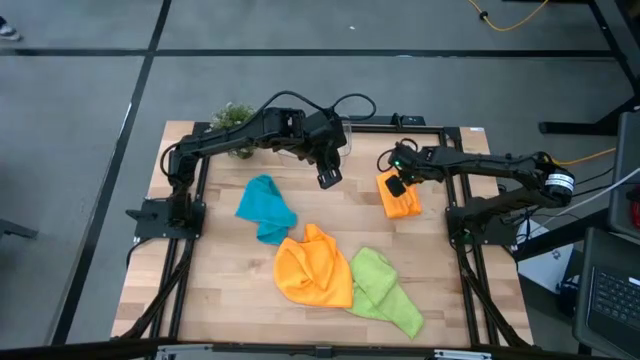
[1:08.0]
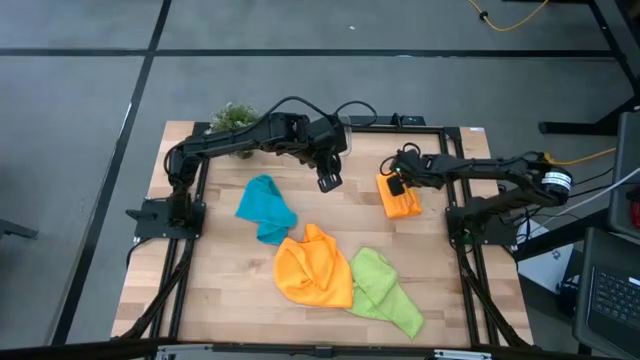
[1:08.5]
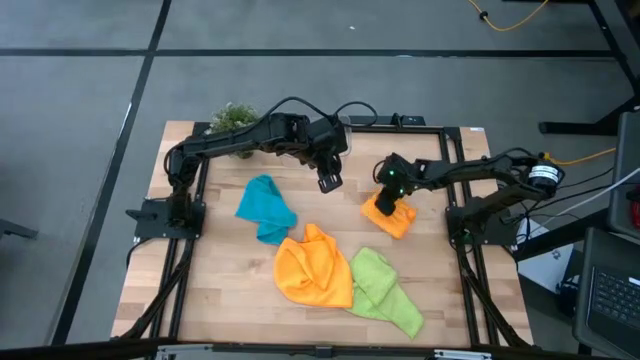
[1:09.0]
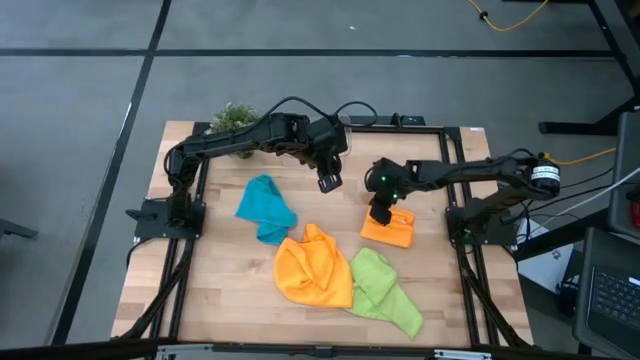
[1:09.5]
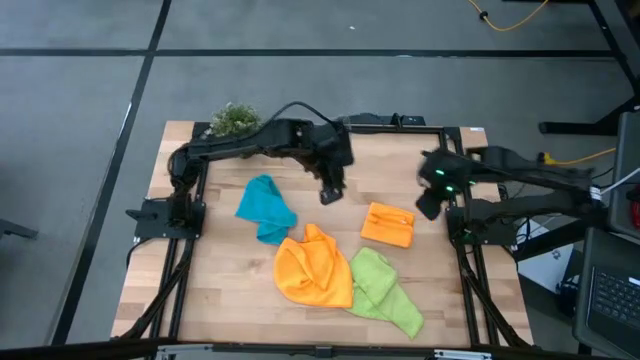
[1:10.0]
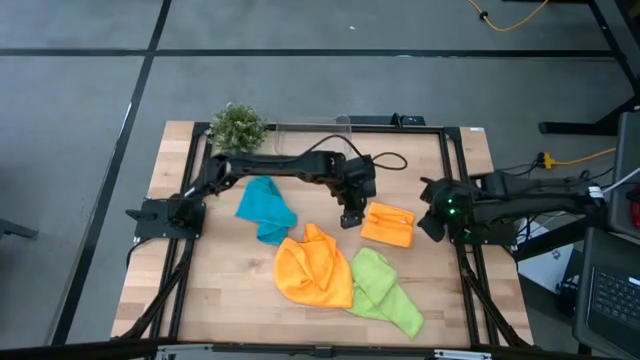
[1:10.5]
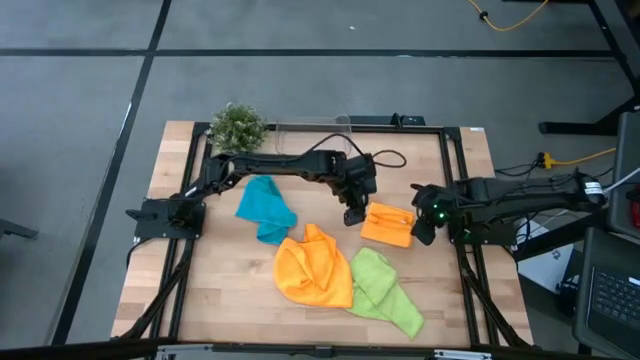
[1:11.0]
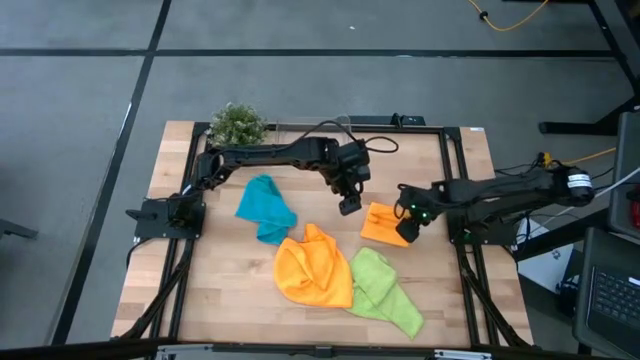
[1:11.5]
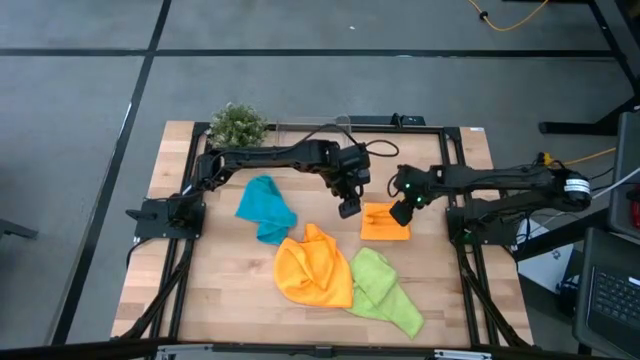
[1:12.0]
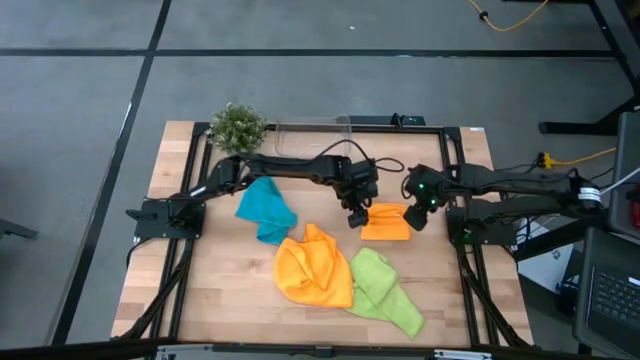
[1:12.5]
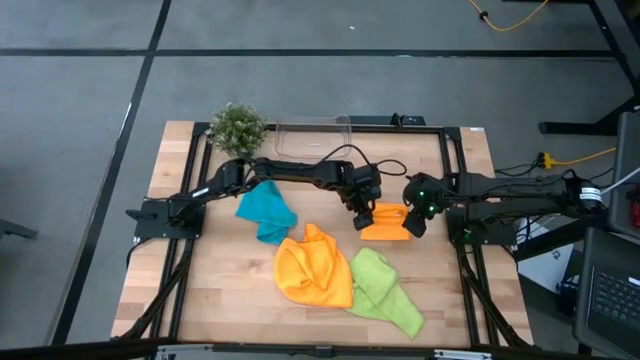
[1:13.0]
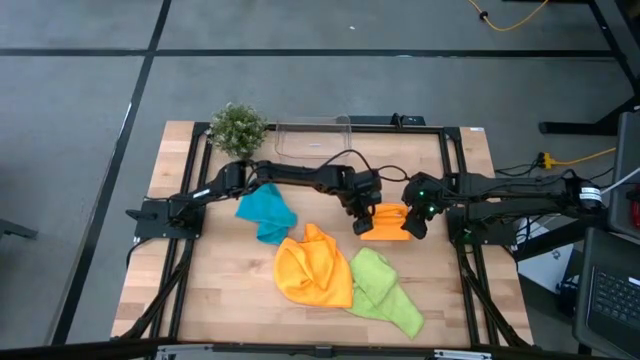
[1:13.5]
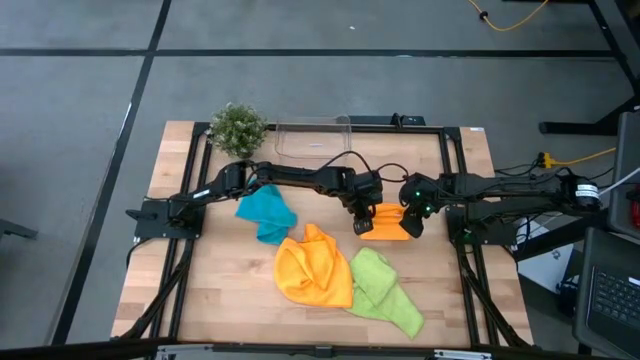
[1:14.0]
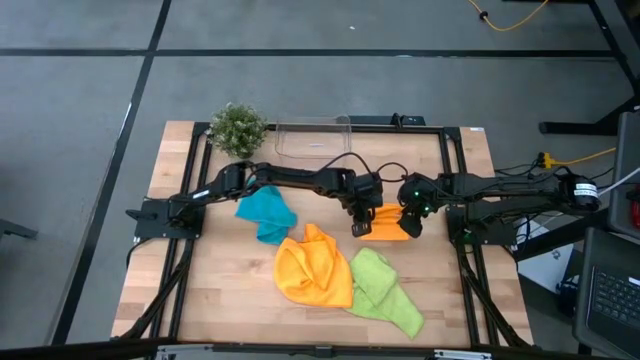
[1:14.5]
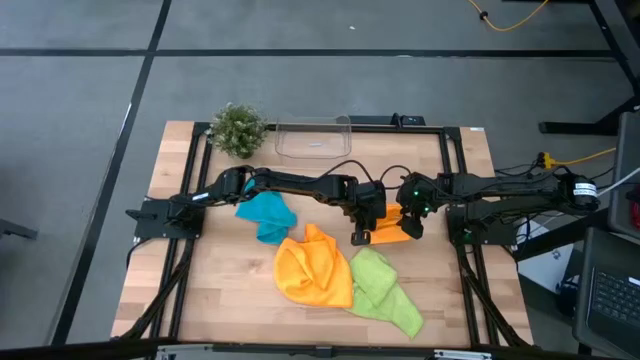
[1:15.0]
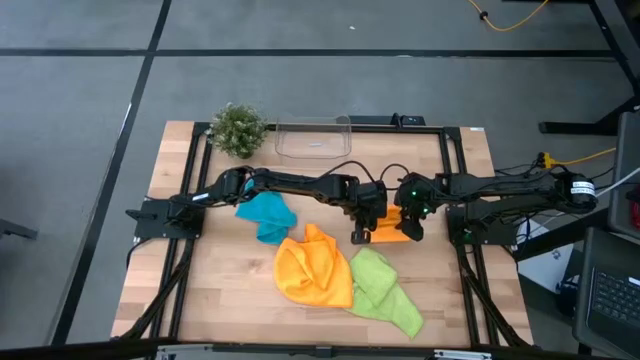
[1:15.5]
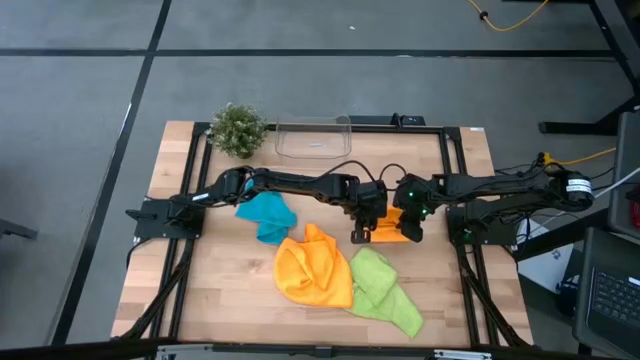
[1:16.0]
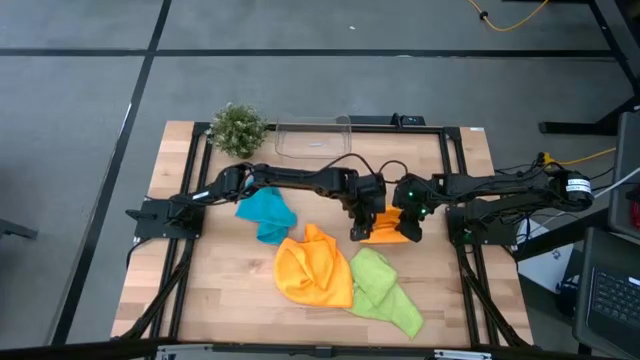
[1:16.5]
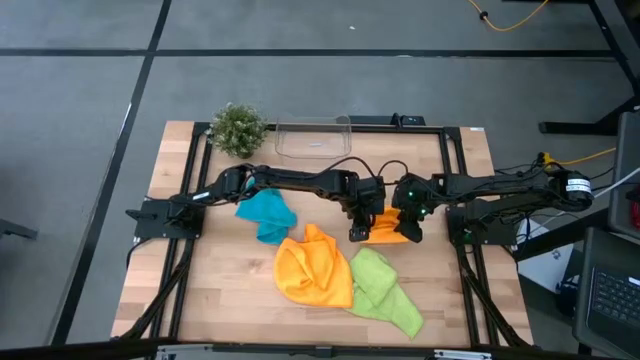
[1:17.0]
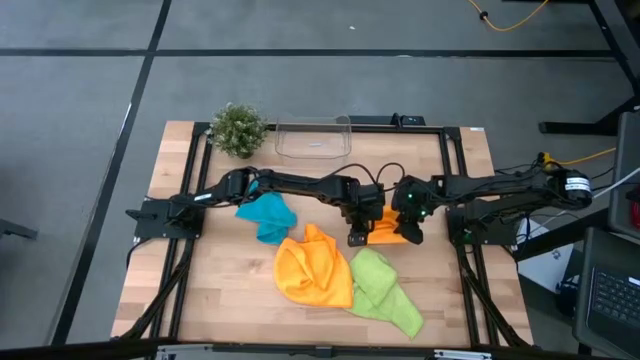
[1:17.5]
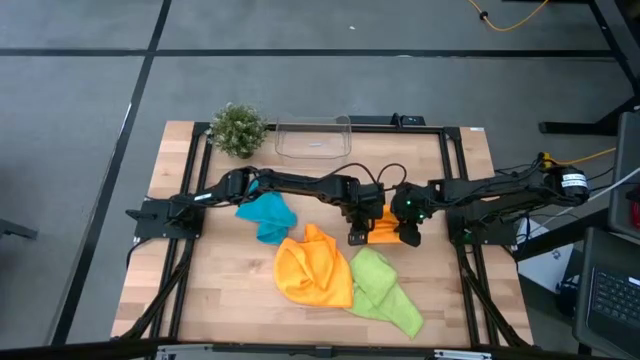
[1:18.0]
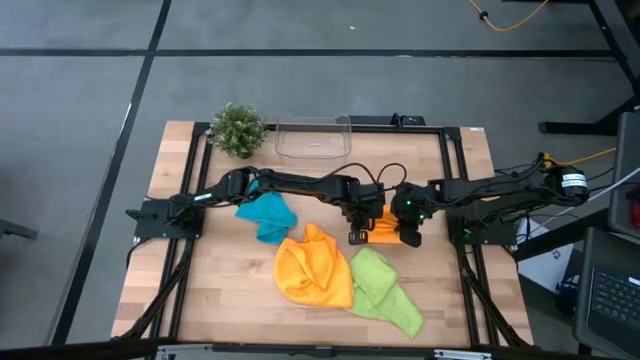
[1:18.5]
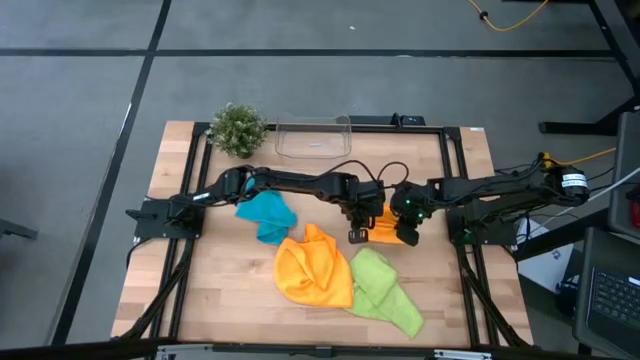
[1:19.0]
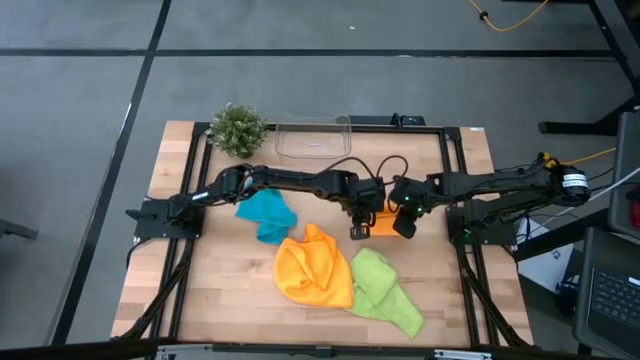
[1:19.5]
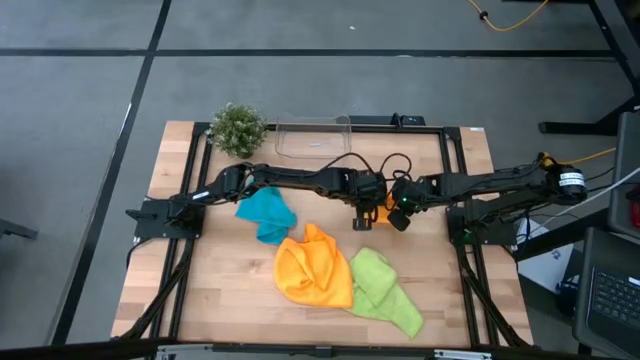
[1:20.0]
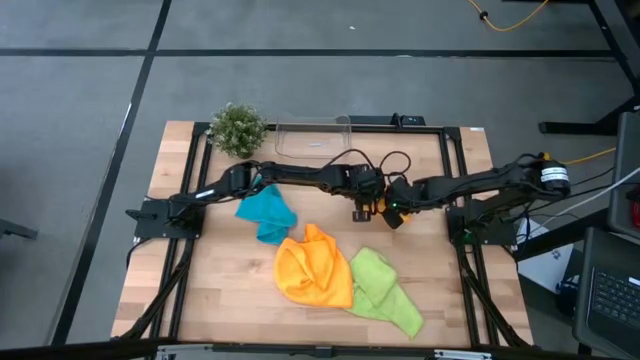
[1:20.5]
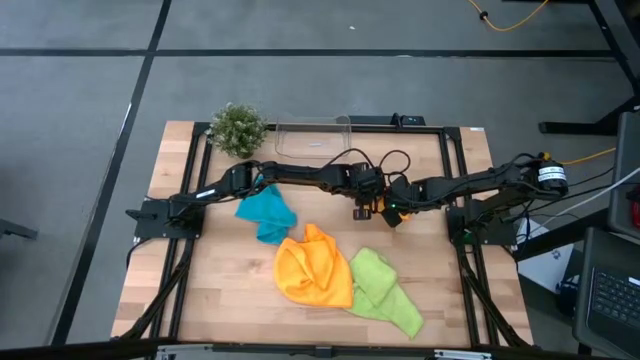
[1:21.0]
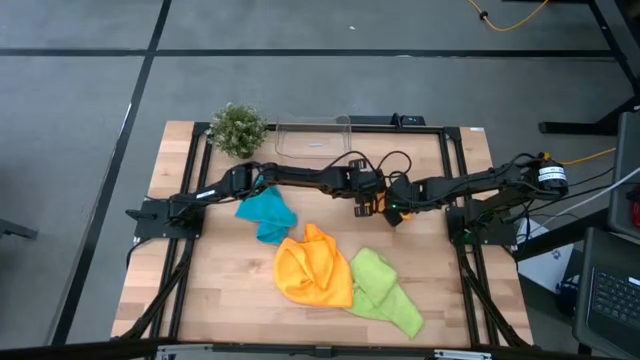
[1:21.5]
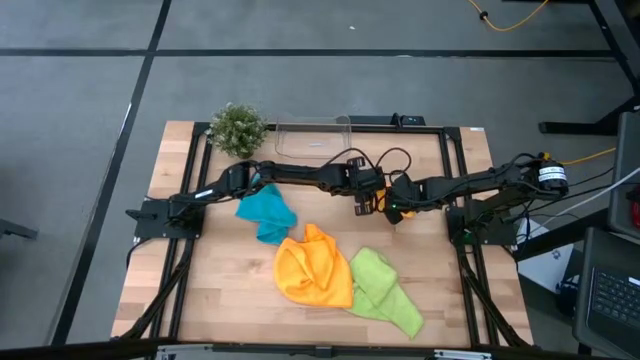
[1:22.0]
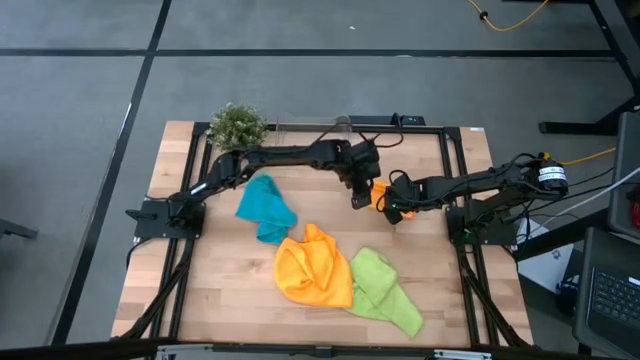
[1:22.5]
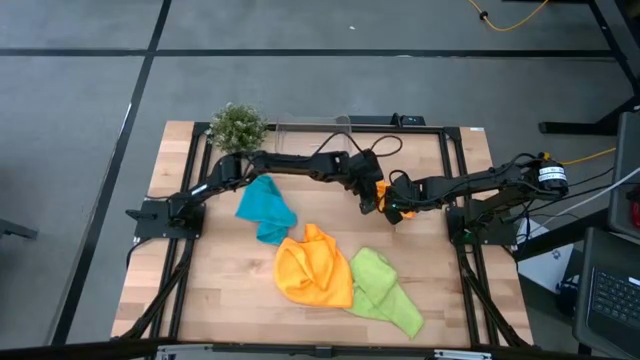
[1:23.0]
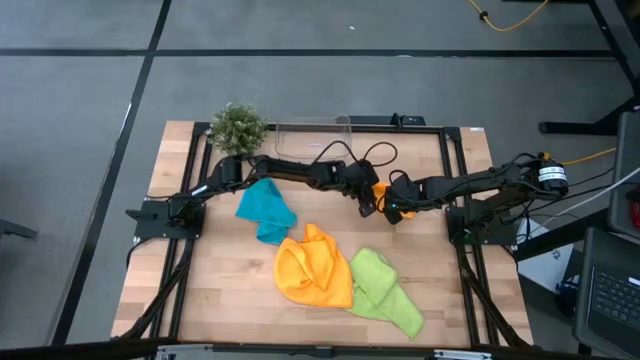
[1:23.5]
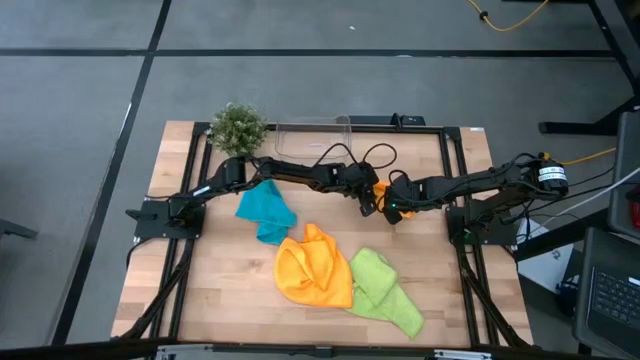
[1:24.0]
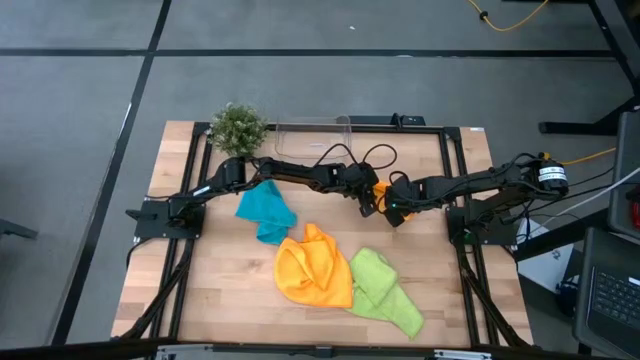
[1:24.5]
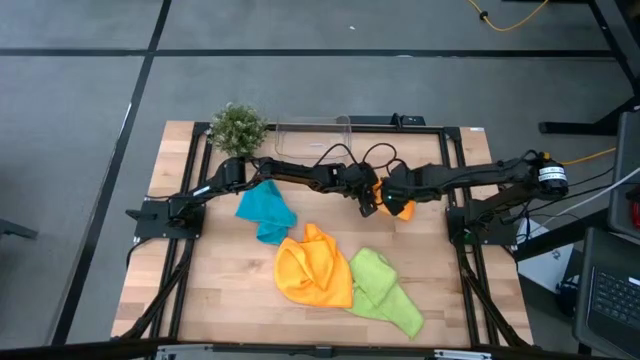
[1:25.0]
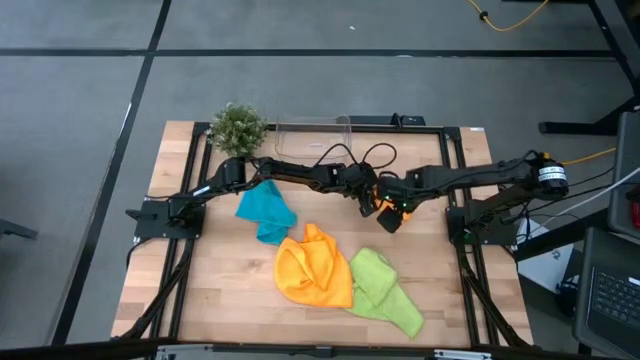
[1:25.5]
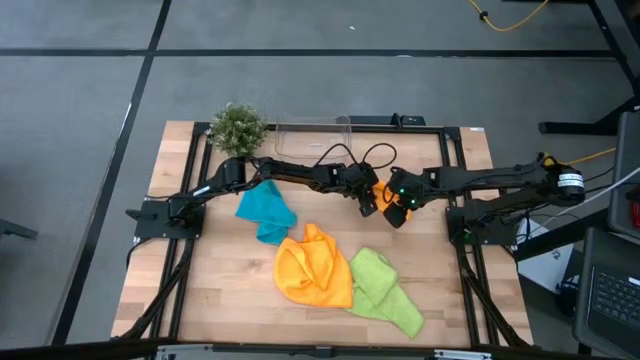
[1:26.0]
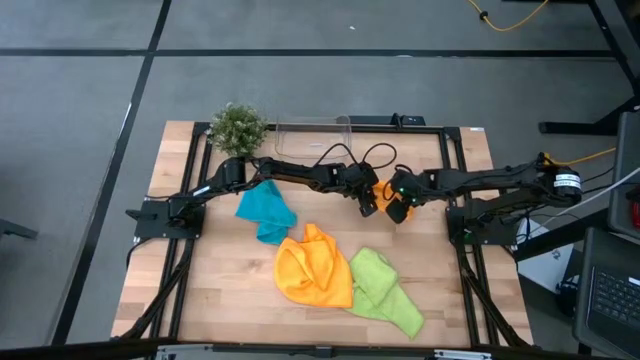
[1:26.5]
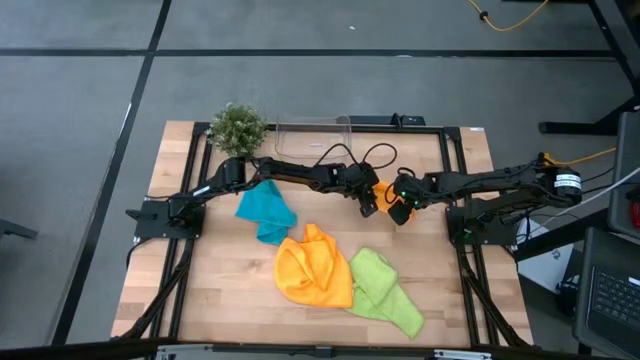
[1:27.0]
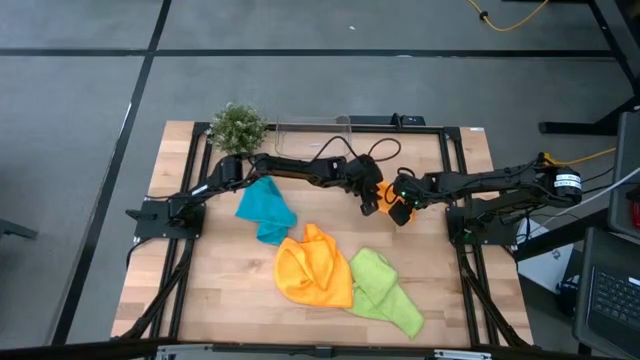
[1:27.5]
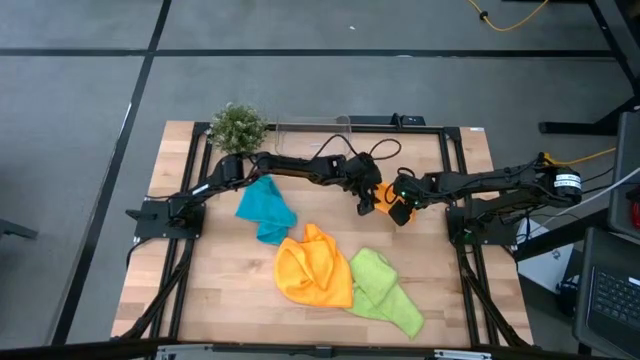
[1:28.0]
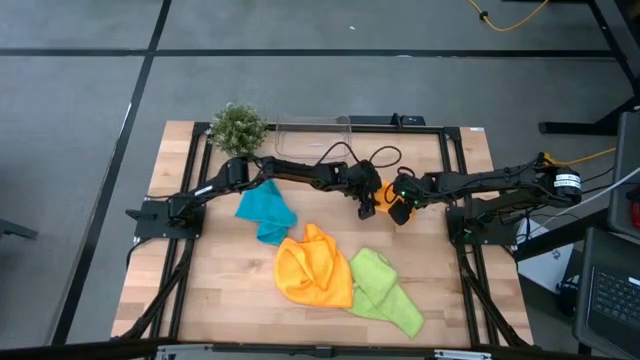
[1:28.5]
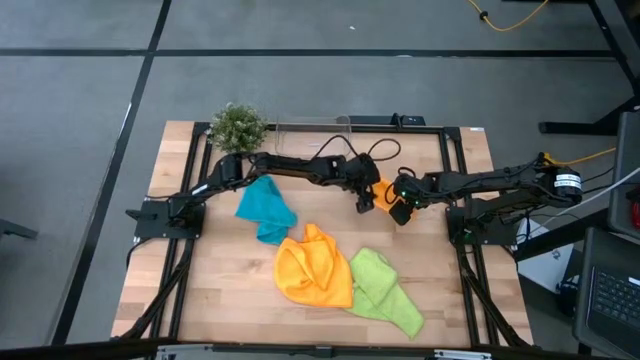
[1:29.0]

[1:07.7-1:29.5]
Task: Fold microfiber towels
Fold the top orange microfiber cloth
